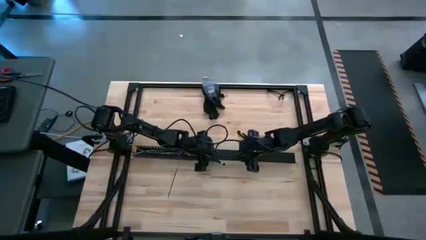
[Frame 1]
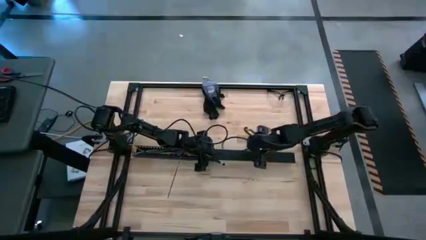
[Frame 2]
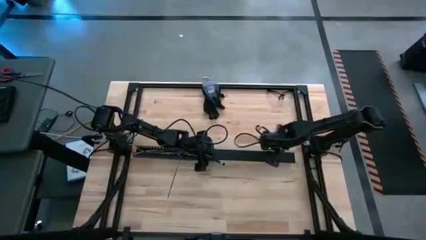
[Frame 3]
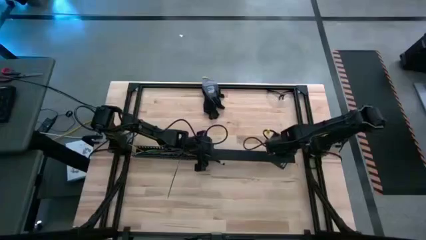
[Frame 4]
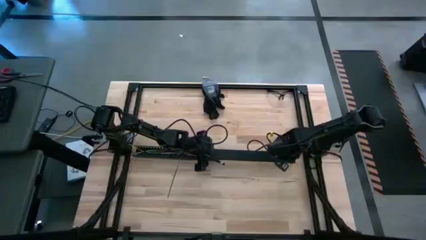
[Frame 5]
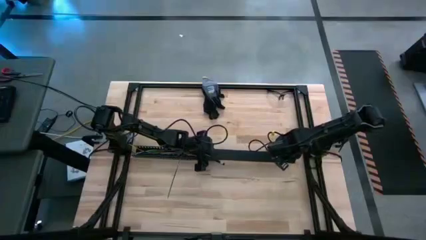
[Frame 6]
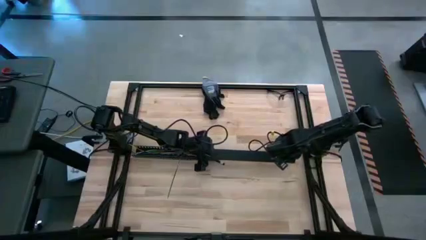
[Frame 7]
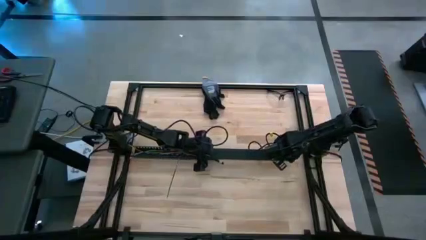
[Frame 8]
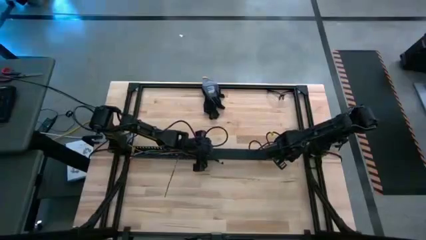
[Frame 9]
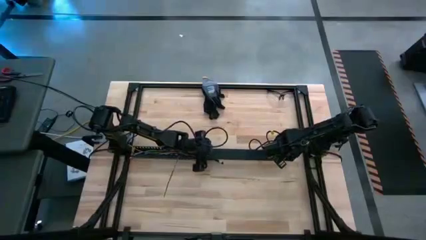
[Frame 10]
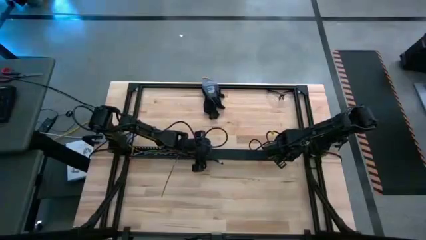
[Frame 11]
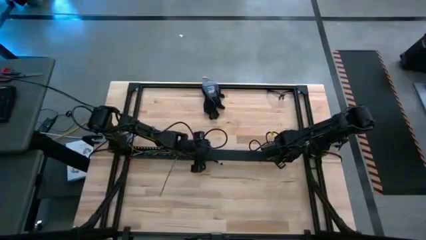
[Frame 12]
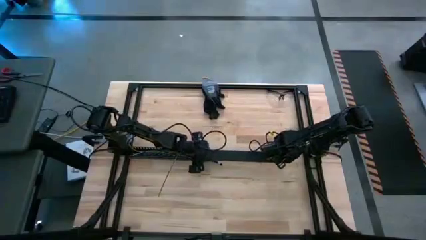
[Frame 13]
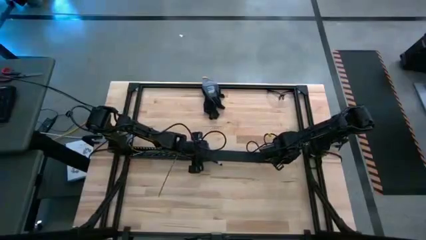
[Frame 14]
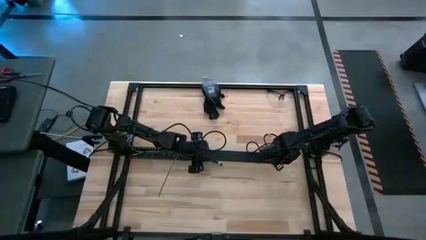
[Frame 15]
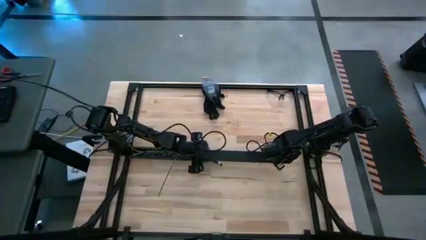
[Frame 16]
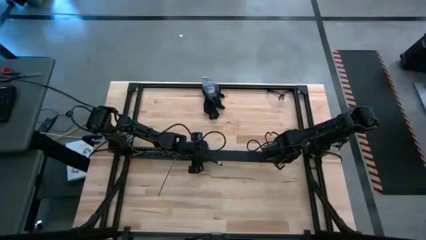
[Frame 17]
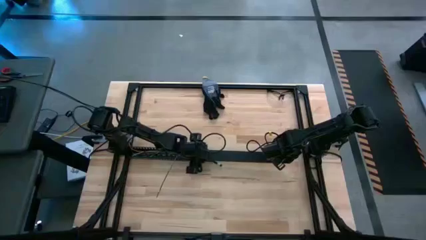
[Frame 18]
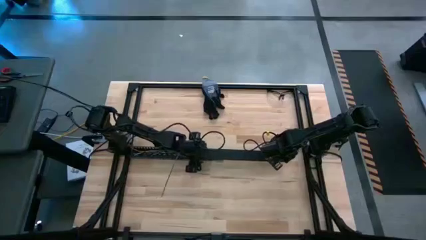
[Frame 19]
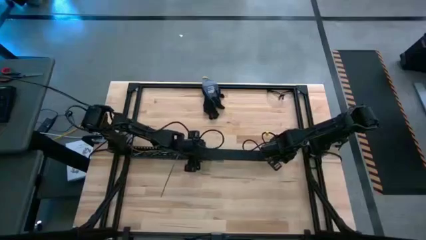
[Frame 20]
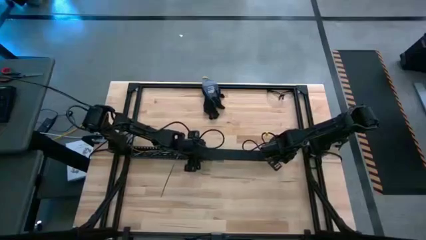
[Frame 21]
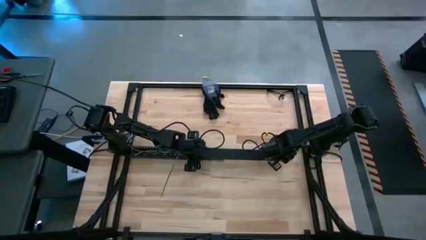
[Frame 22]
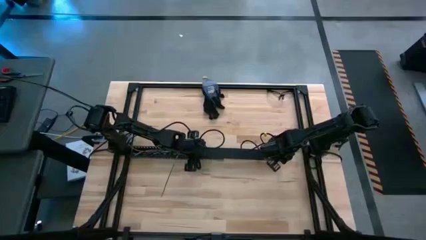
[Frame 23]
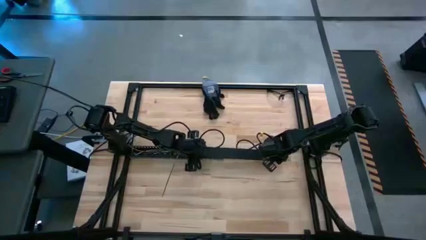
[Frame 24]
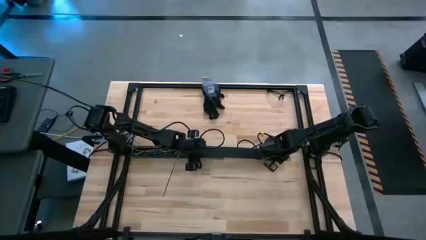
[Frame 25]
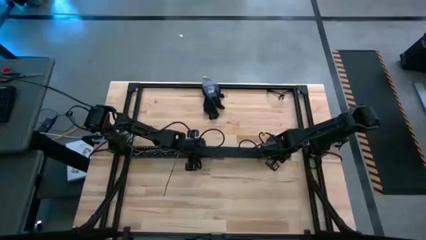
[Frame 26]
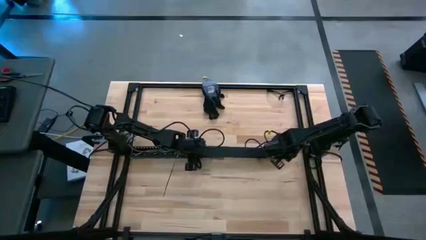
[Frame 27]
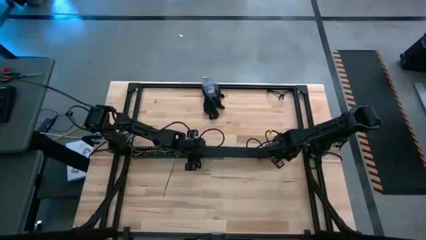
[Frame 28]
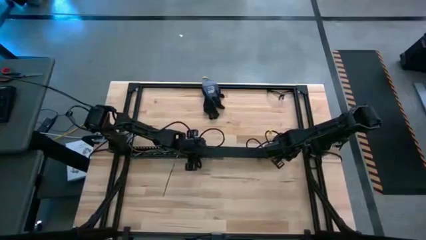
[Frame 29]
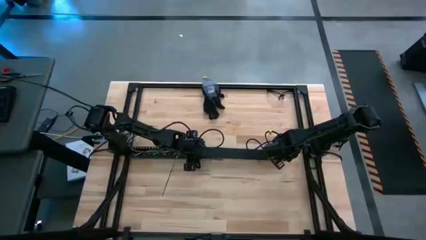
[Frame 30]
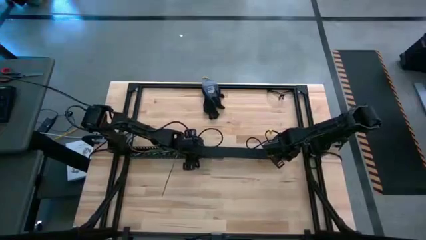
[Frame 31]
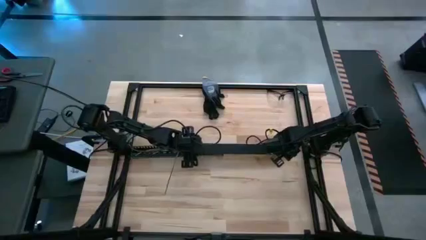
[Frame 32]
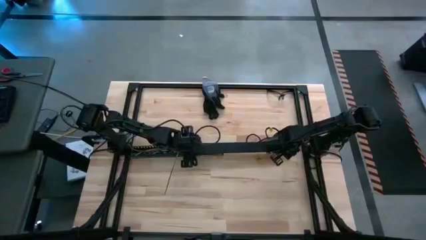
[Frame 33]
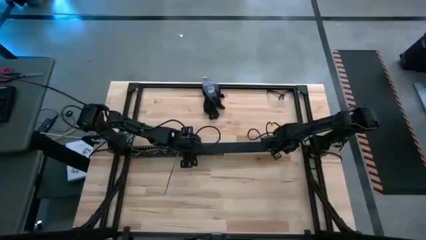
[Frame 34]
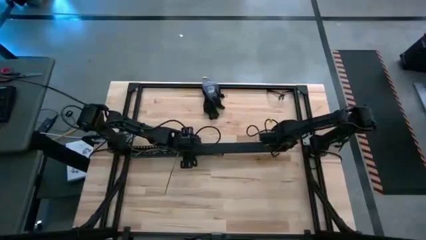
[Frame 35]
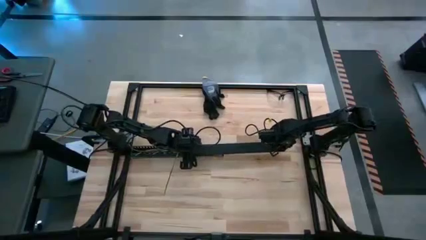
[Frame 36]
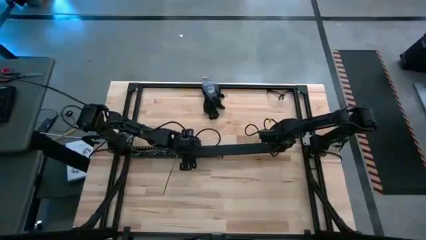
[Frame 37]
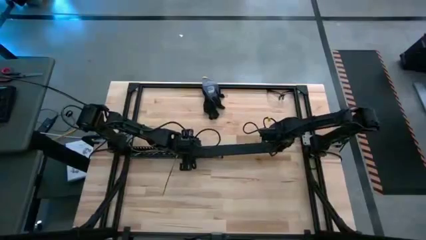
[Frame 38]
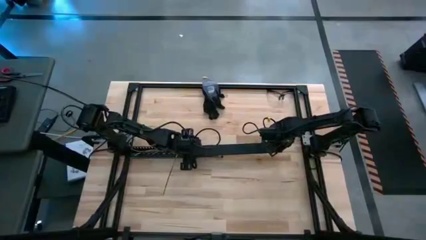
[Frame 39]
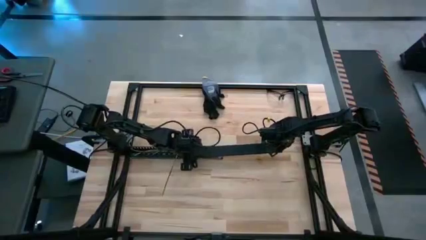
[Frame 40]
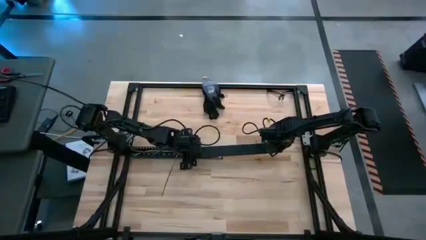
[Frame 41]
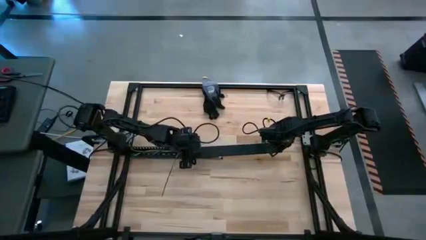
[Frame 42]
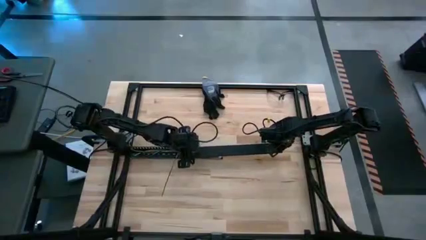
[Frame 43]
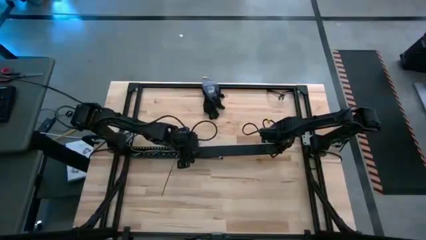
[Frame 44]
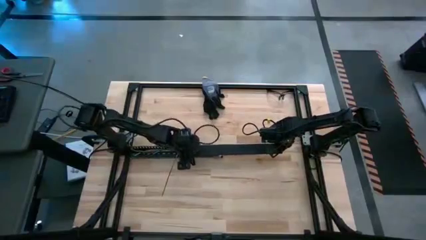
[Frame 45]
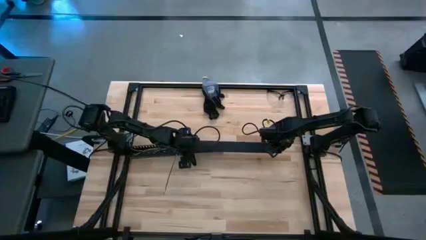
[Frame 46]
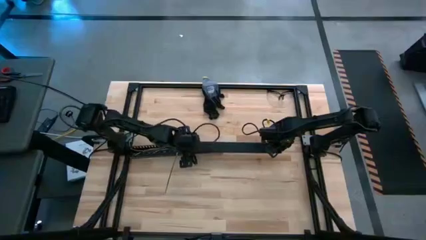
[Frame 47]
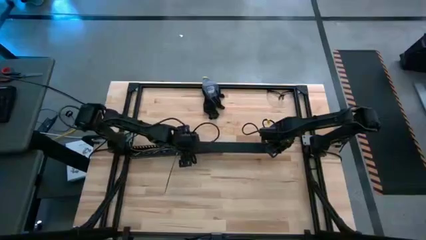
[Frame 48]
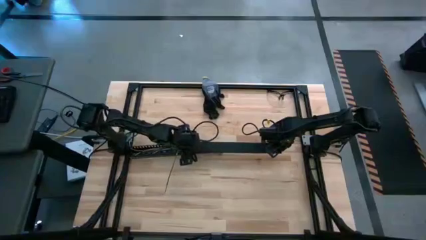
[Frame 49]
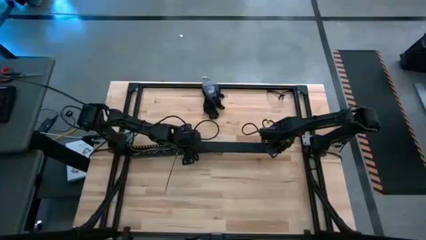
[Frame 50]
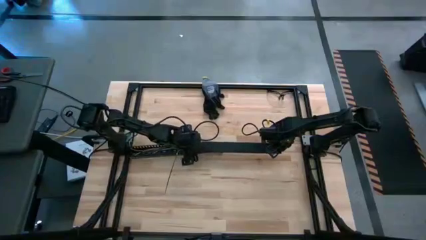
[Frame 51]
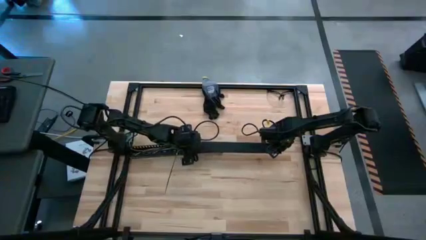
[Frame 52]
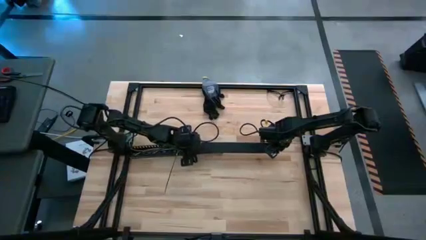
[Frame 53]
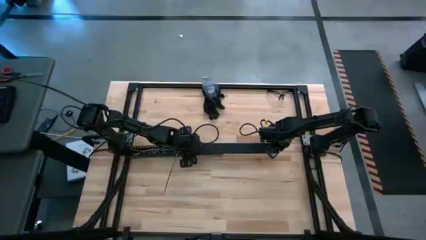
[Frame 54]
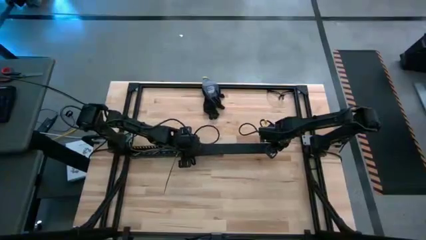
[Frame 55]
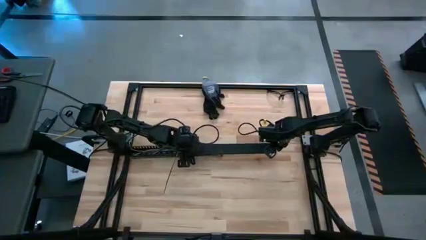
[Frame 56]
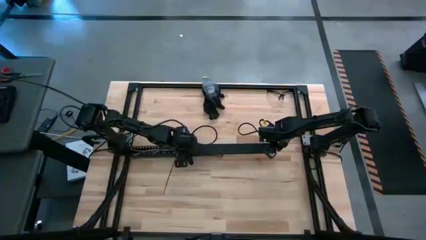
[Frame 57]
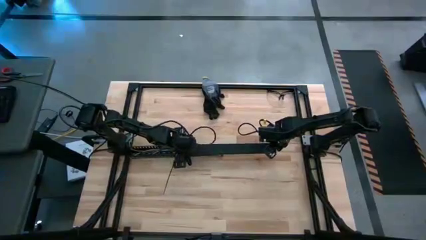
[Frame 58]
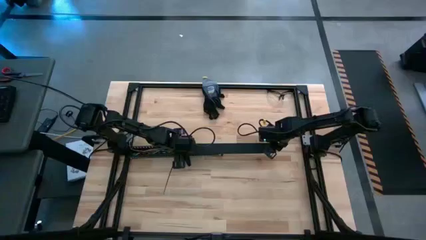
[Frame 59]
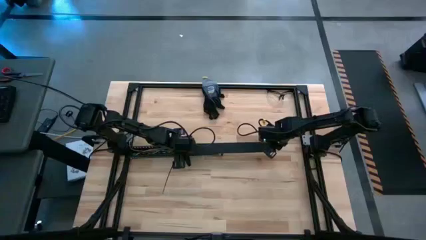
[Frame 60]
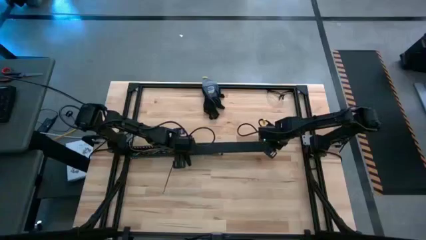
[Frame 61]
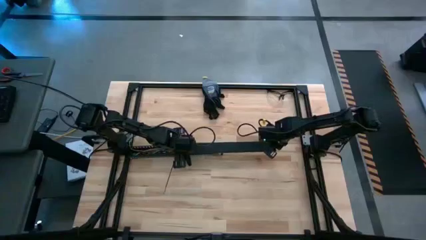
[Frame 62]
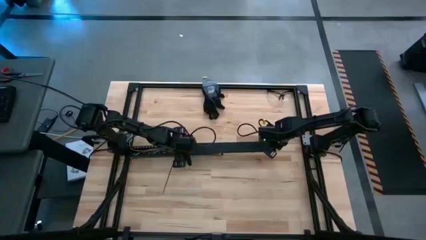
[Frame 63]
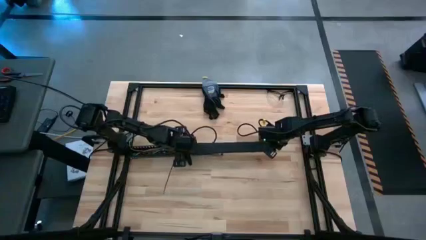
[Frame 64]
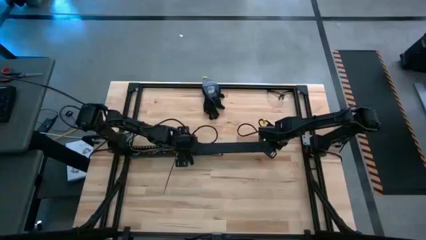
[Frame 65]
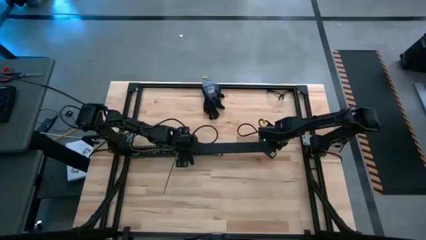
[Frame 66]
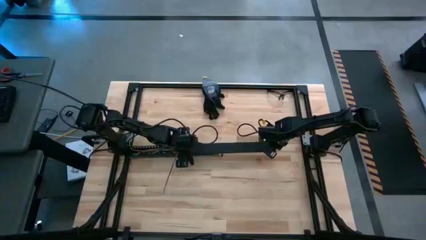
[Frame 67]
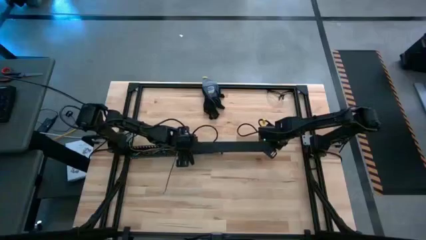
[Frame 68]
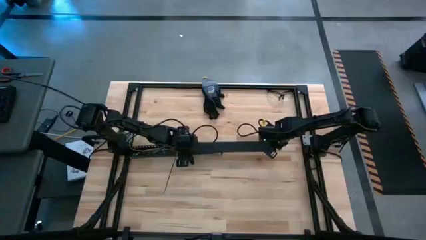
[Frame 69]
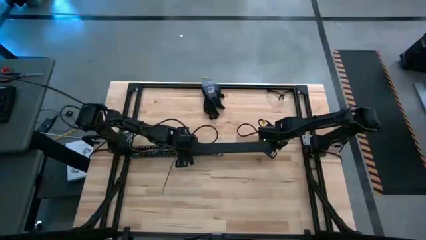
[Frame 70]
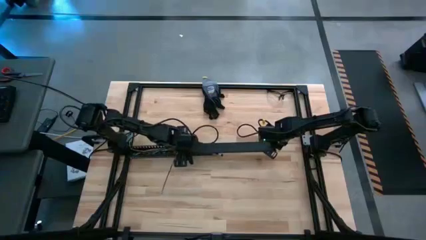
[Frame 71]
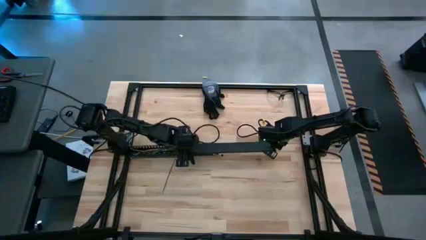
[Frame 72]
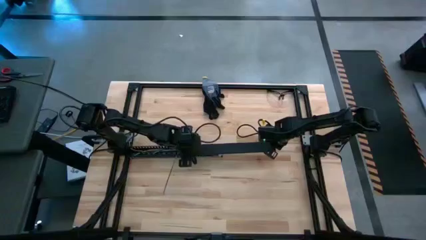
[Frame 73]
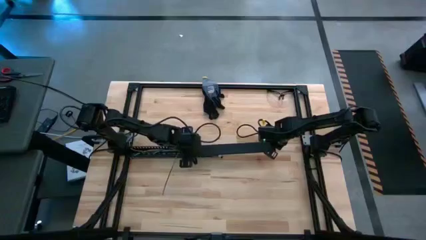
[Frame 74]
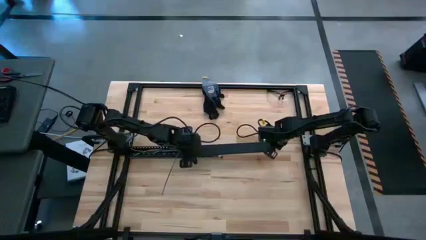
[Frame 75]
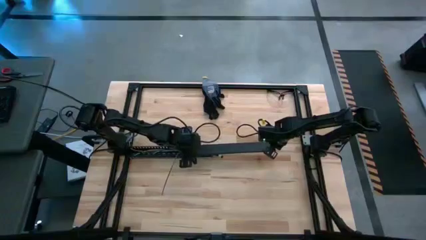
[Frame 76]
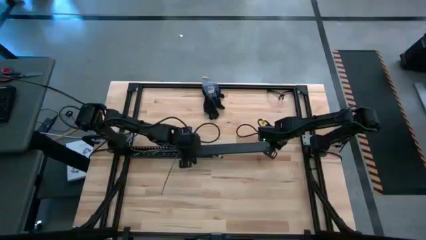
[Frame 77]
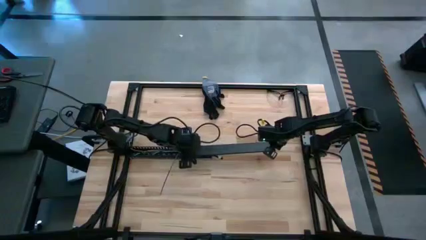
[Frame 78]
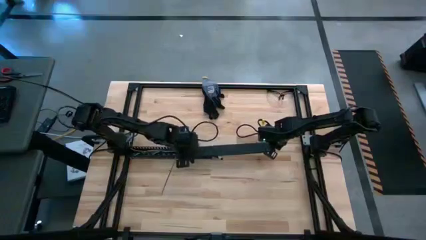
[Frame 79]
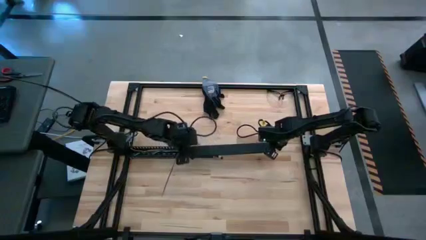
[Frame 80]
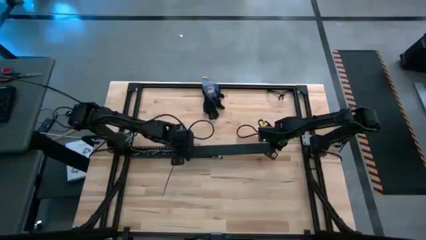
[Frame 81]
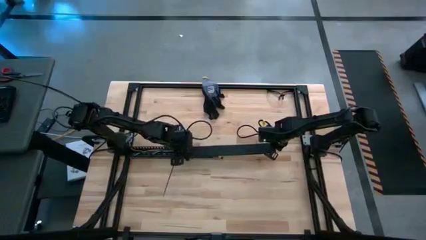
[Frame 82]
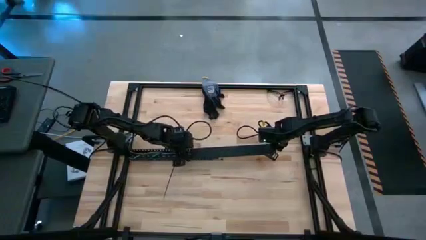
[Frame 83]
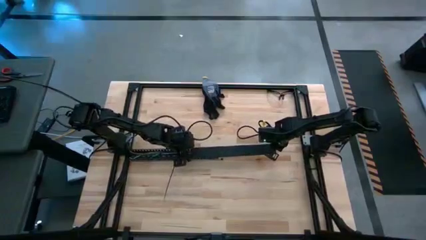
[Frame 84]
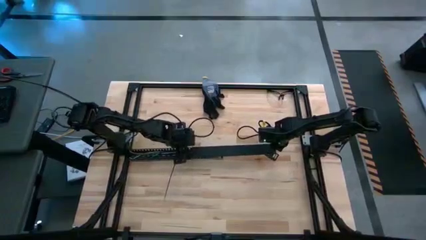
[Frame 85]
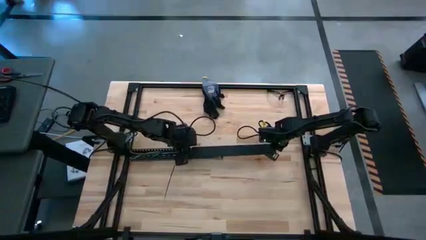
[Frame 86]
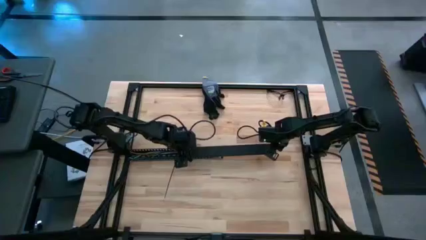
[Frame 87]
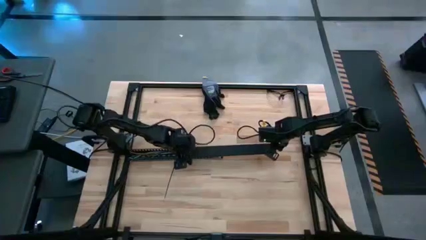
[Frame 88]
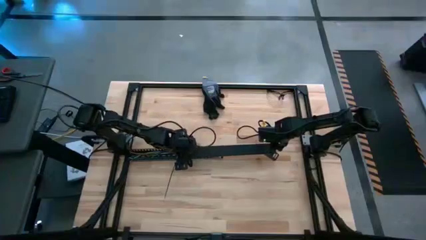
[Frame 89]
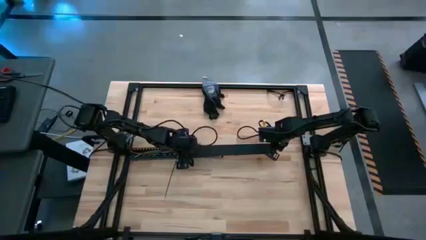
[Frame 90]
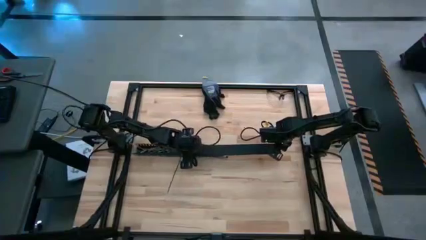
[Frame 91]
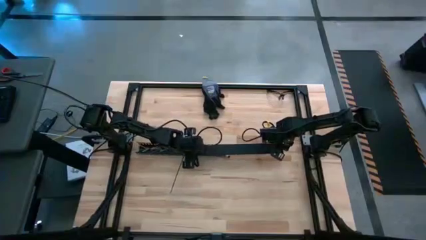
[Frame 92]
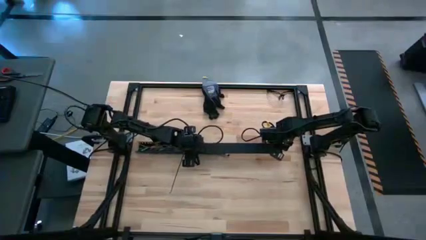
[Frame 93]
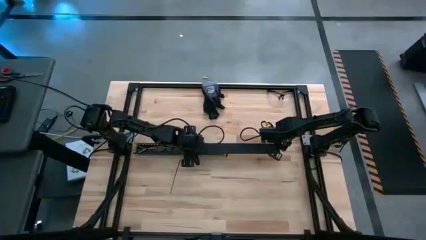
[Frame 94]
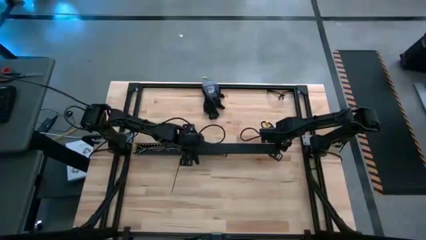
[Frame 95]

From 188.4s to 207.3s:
Task: Ziptie cables
Close the black cable duct
